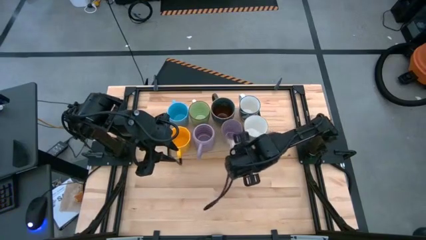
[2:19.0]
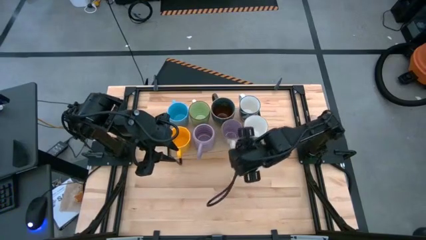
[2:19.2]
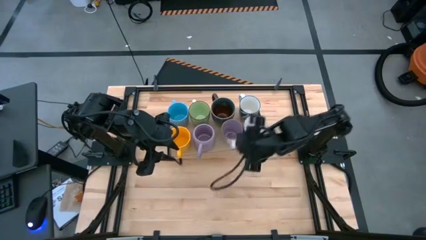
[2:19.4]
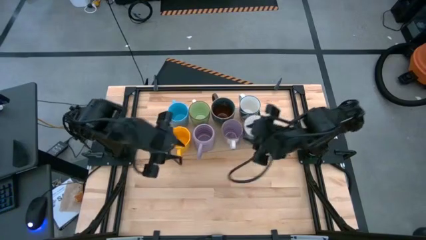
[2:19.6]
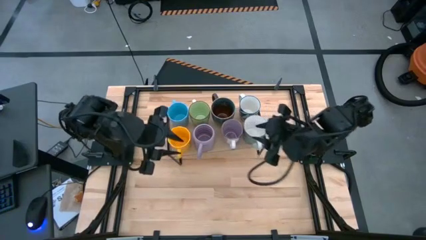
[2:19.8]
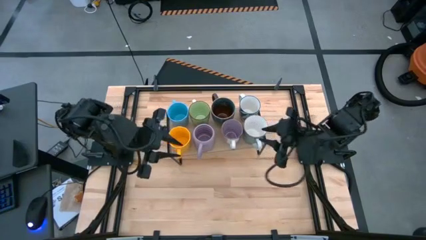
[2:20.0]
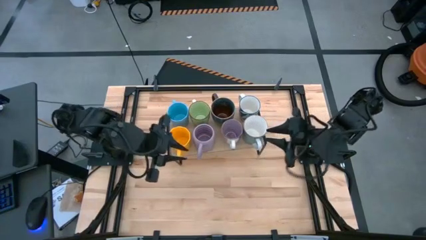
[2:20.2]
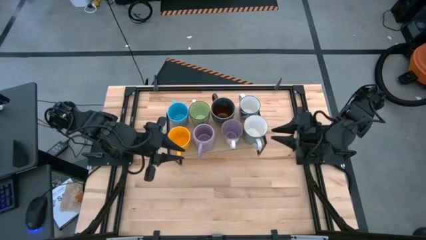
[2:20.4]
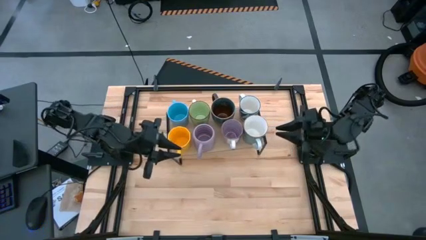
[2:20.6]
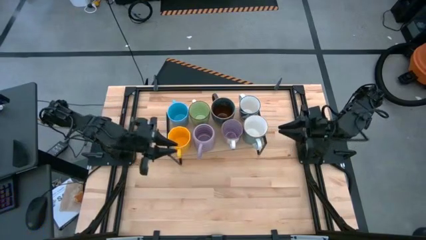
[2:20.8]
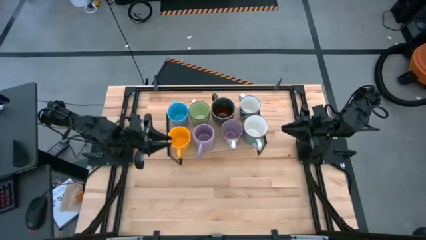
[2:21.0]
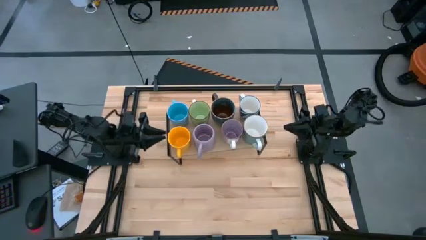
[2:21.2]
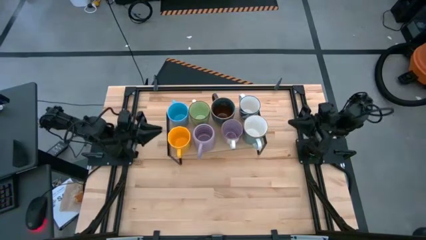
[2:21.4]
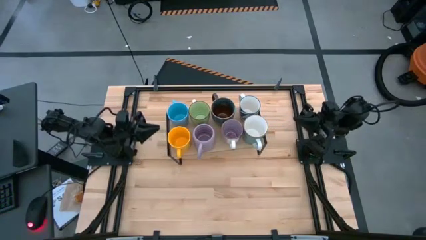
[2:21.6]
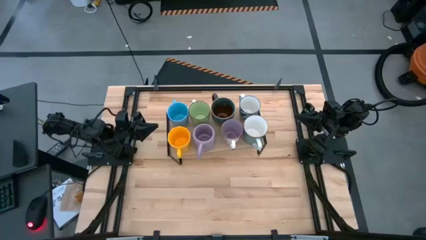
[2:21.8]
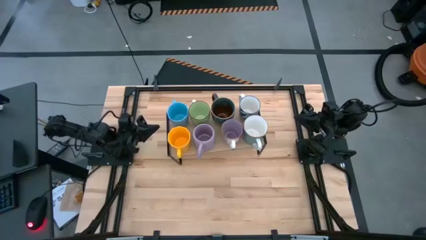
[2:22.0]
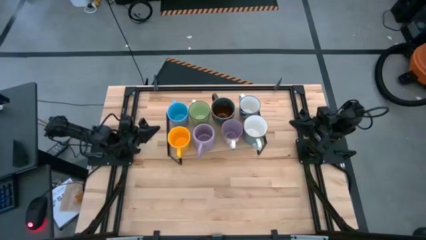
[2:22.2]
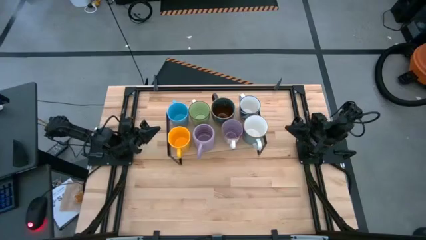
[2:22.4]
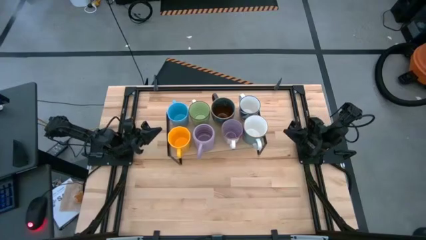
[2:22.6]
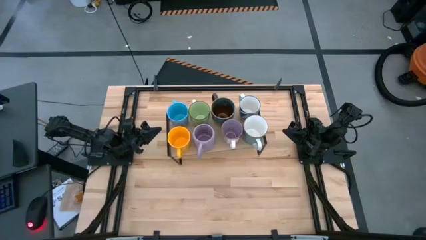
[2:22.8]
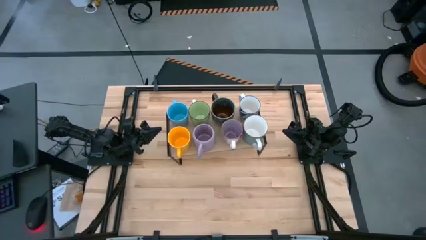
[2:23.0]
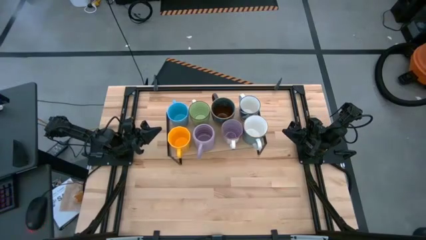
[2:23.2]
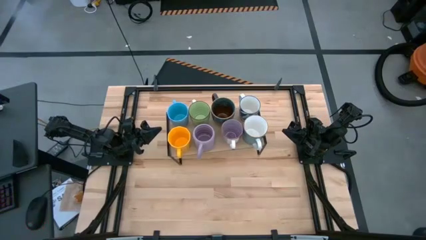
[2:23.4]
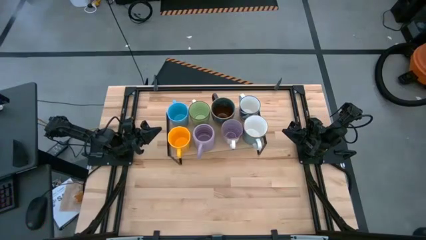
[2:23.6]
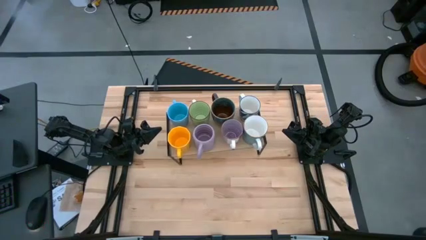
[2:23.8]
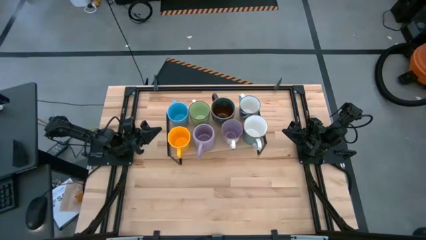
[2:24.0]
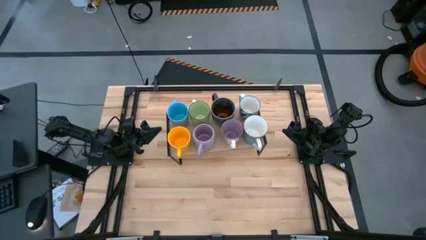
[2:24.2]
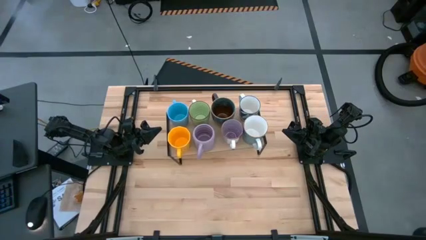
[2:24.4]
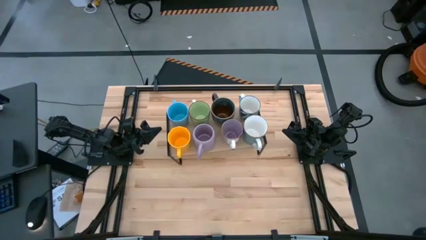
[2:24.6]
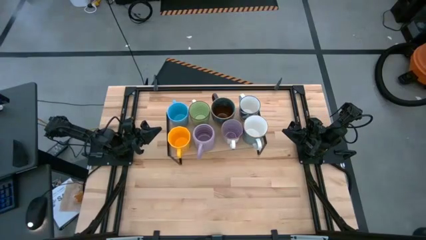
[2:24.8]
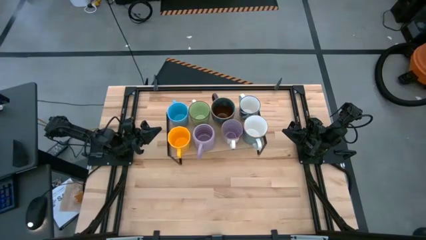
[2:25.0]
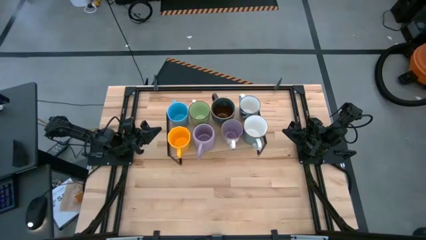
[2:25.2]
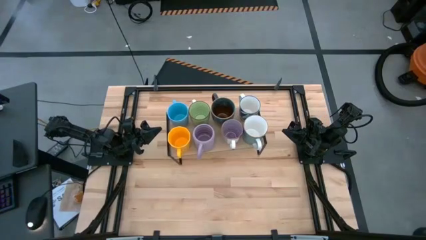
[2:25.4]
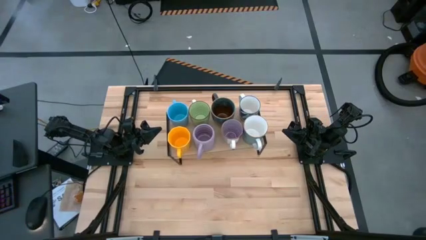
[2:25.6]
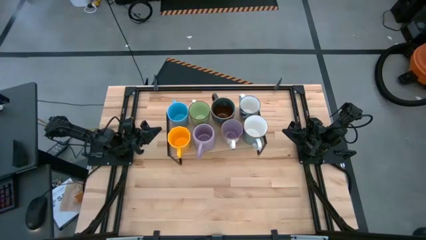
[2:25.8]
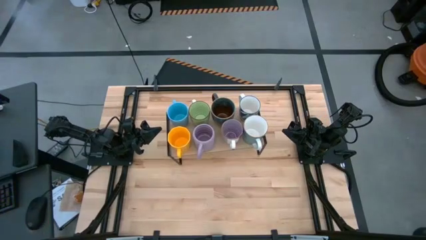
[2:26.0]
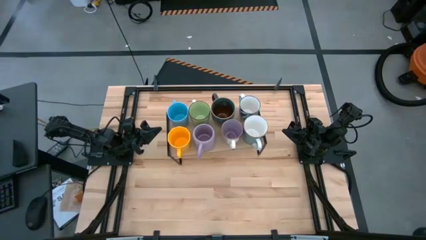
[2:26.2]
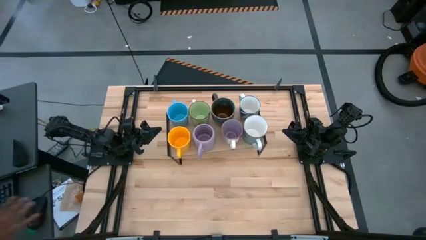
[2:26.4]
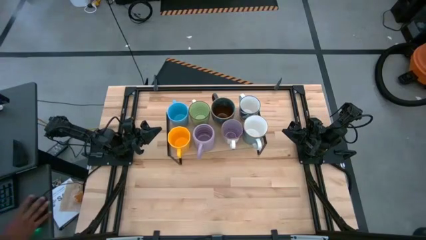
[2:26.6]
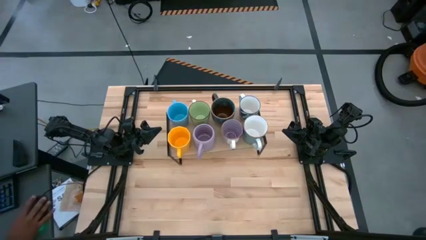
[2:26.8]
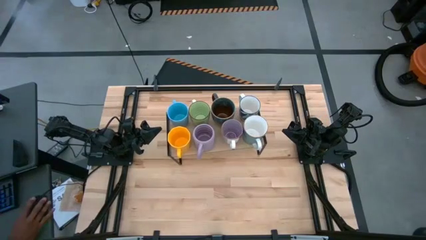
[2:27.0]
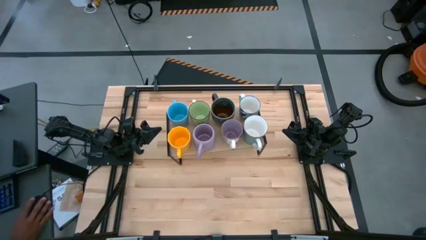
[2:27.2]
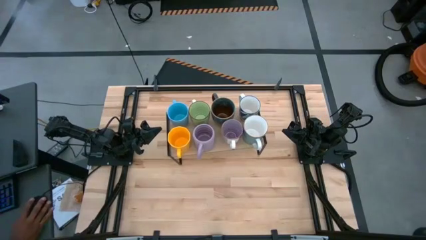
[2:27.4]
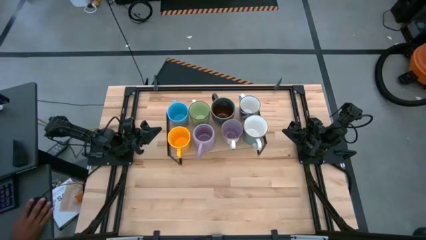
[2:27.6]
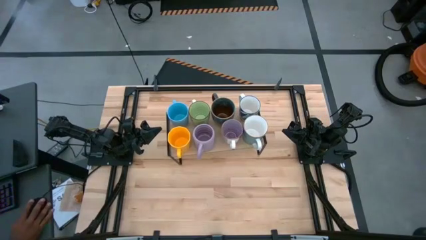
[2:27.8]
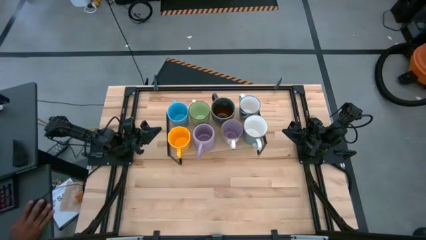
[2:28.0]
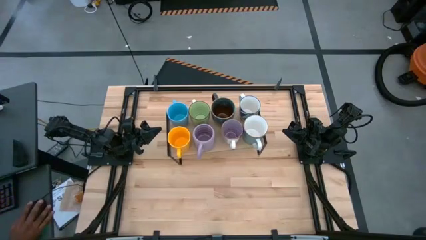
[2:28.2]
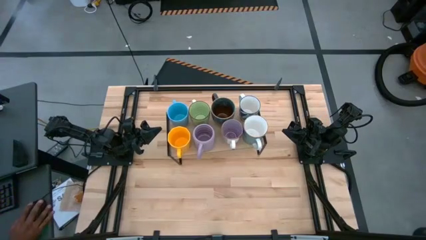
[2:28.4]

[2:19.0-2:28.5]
Task: Place coffee mugs
Return to Home Position
